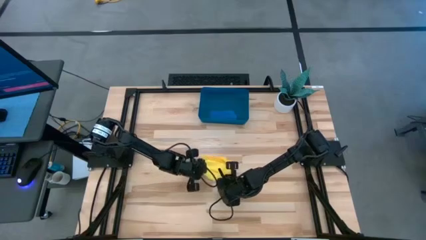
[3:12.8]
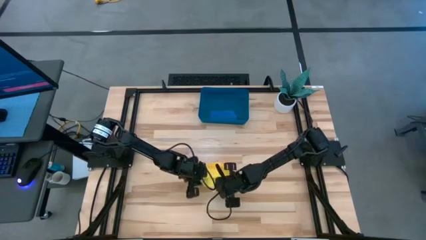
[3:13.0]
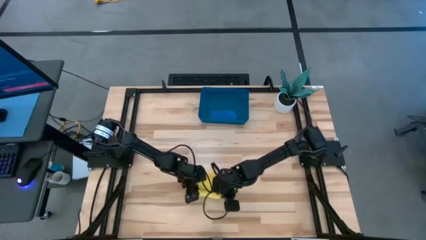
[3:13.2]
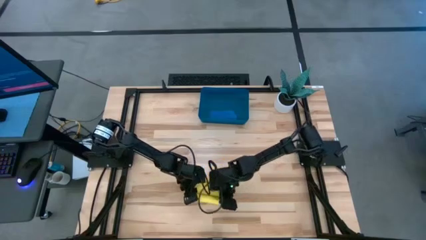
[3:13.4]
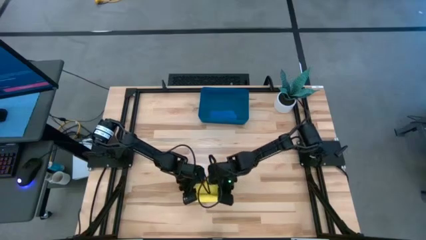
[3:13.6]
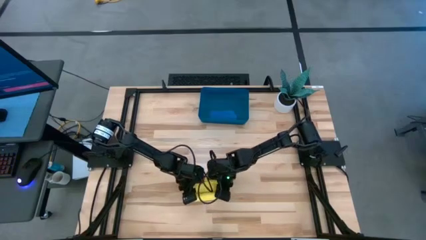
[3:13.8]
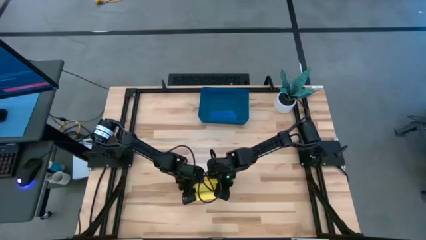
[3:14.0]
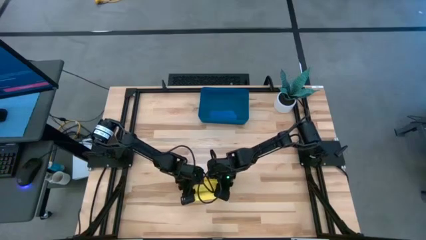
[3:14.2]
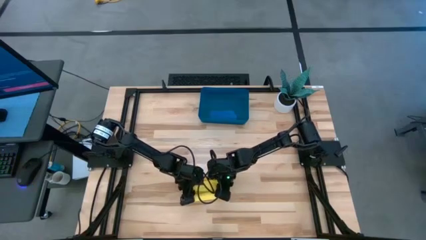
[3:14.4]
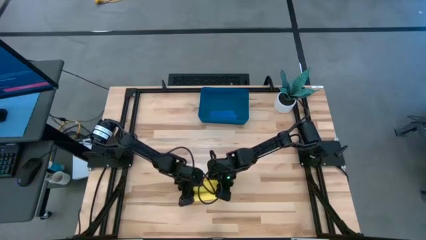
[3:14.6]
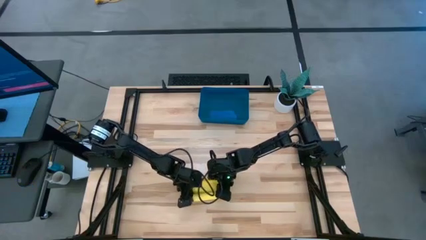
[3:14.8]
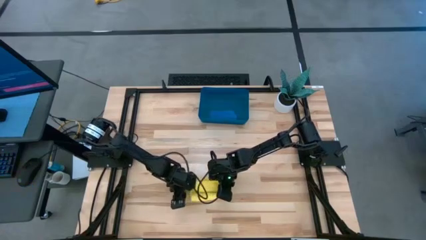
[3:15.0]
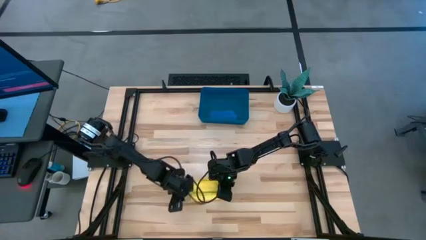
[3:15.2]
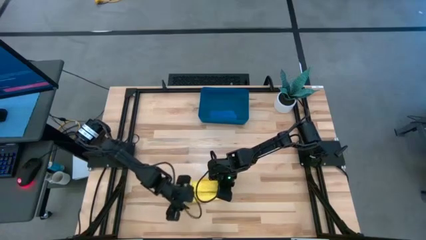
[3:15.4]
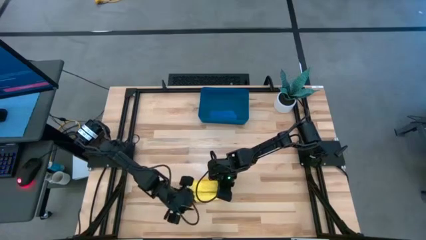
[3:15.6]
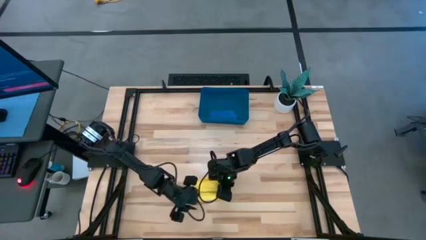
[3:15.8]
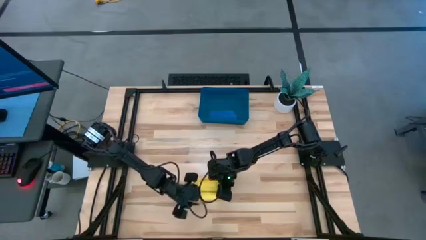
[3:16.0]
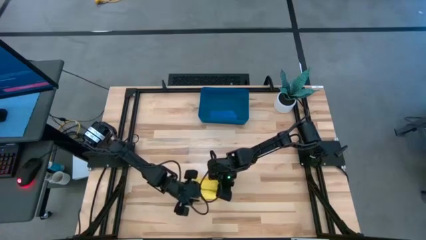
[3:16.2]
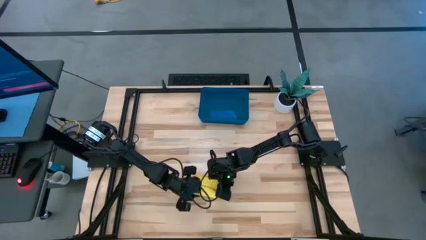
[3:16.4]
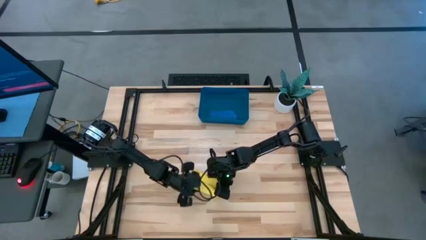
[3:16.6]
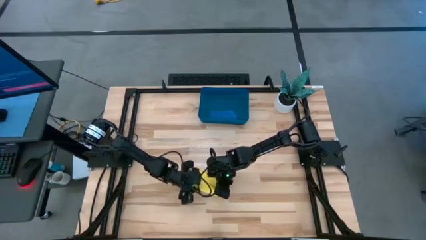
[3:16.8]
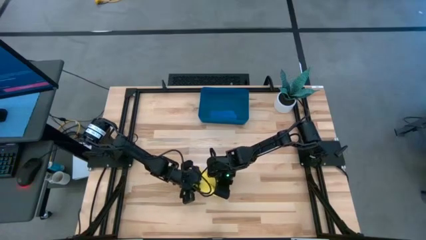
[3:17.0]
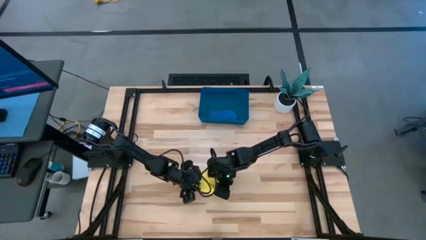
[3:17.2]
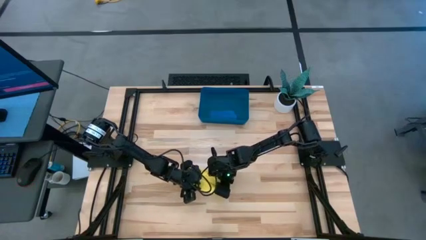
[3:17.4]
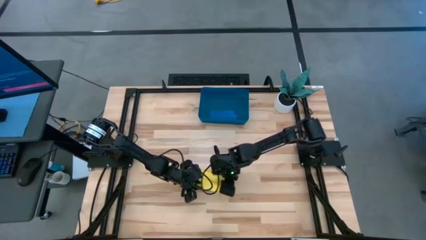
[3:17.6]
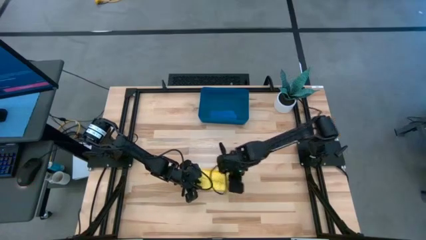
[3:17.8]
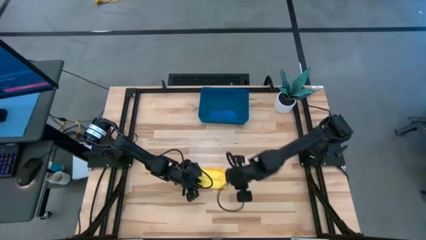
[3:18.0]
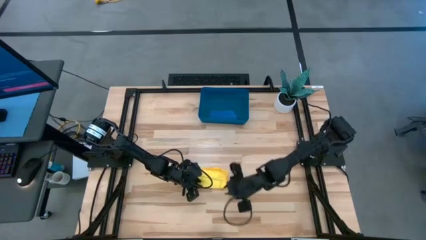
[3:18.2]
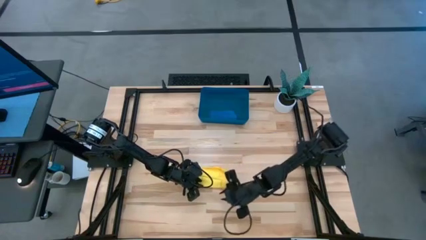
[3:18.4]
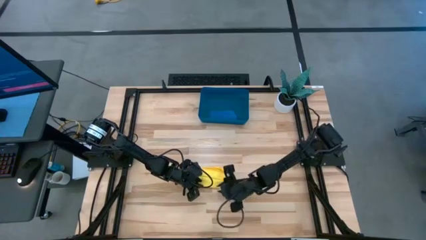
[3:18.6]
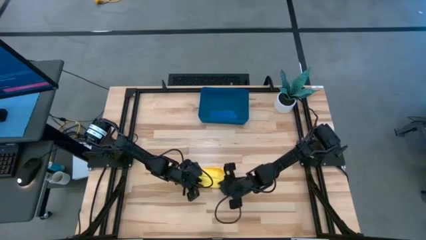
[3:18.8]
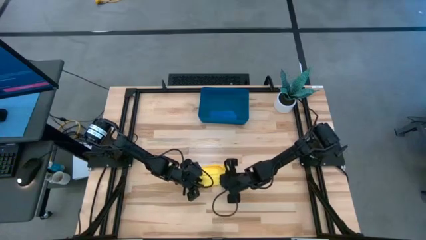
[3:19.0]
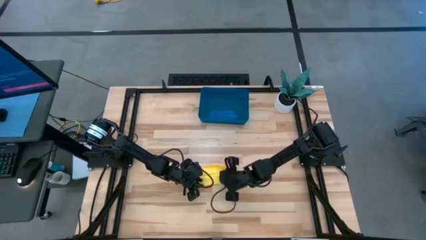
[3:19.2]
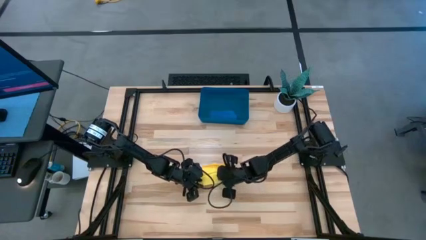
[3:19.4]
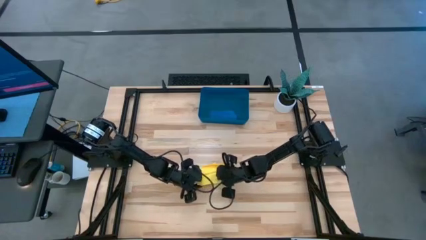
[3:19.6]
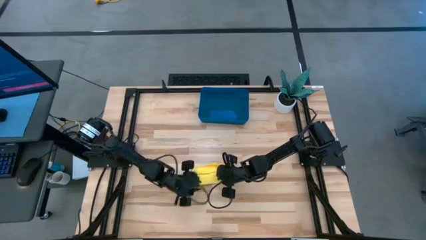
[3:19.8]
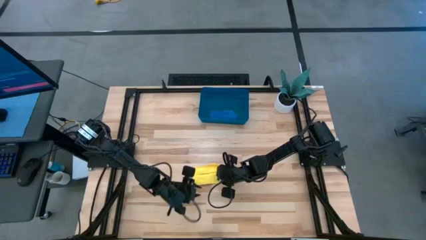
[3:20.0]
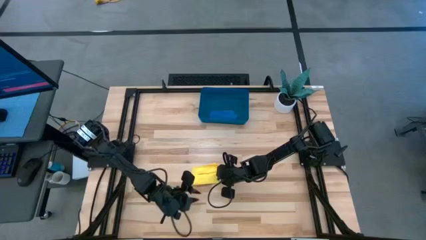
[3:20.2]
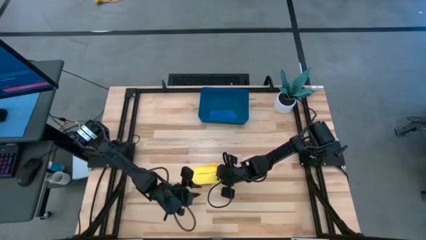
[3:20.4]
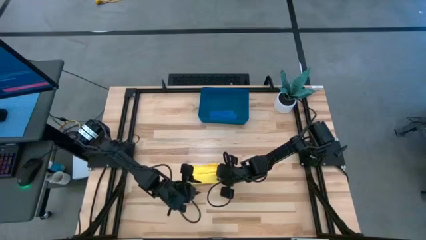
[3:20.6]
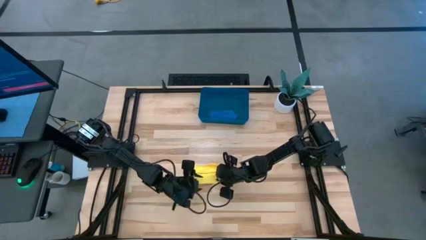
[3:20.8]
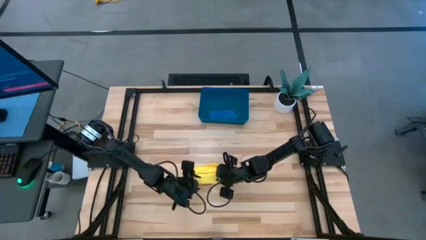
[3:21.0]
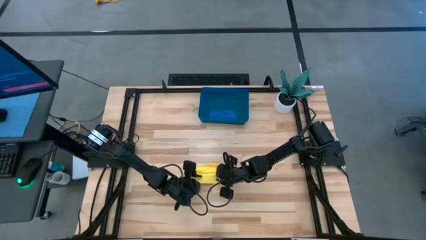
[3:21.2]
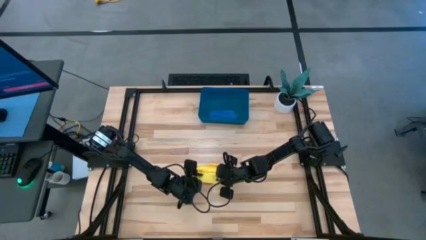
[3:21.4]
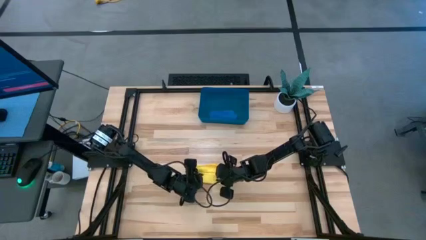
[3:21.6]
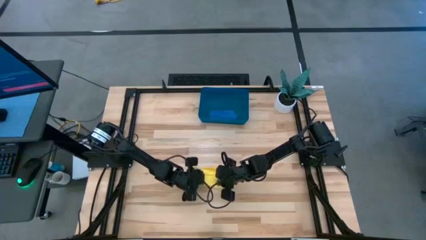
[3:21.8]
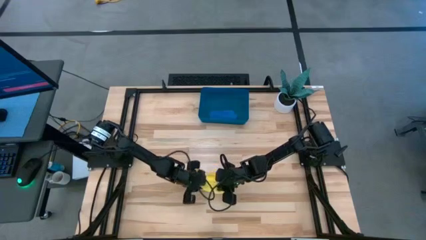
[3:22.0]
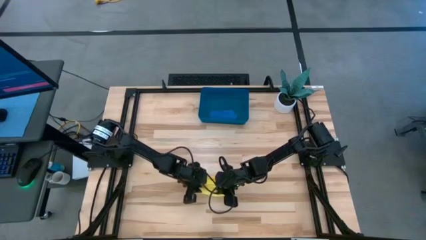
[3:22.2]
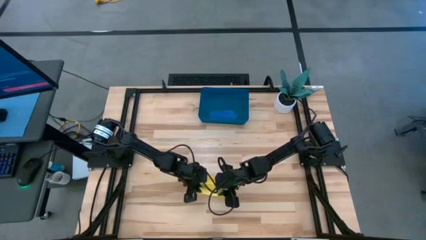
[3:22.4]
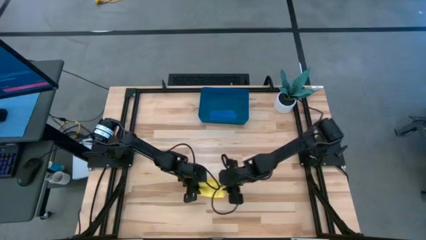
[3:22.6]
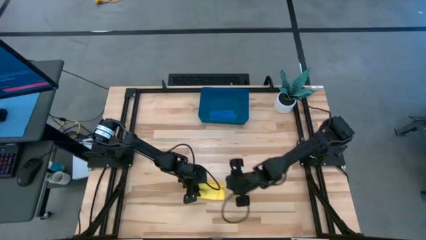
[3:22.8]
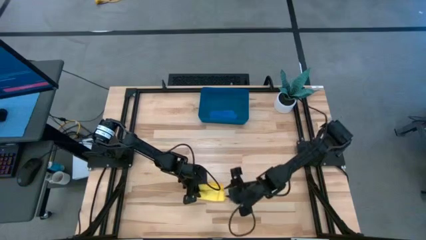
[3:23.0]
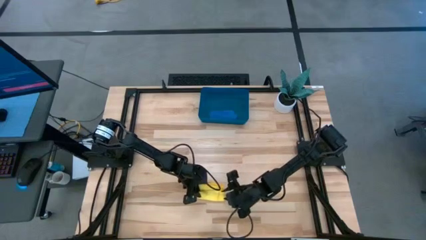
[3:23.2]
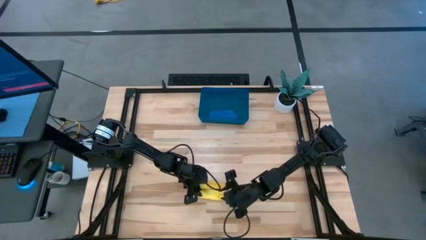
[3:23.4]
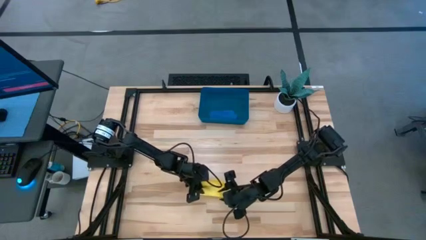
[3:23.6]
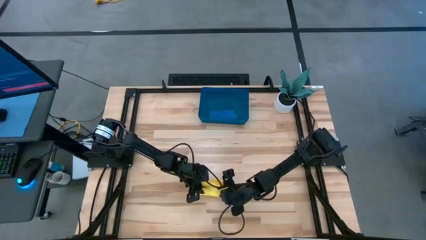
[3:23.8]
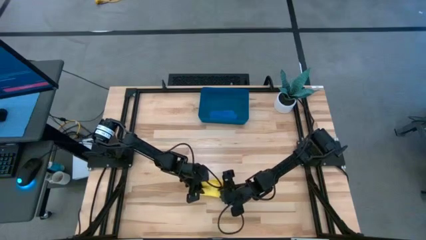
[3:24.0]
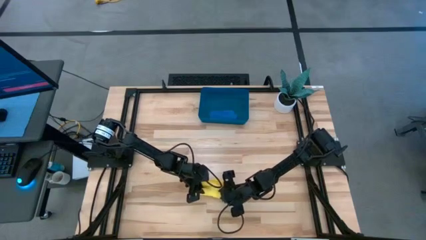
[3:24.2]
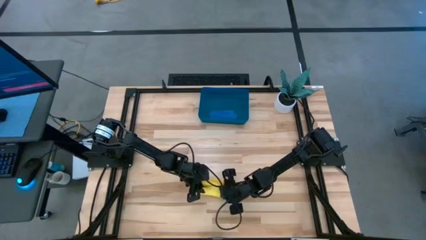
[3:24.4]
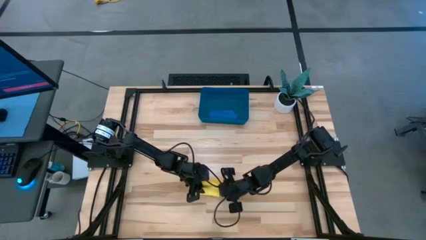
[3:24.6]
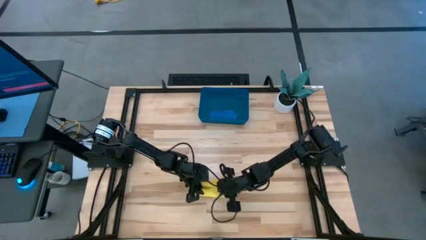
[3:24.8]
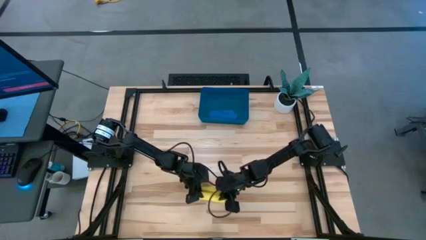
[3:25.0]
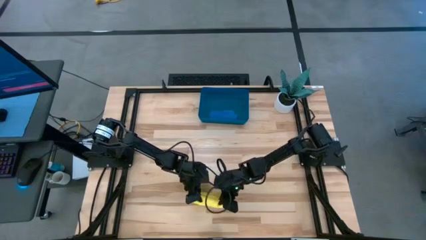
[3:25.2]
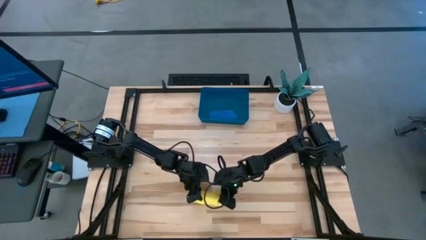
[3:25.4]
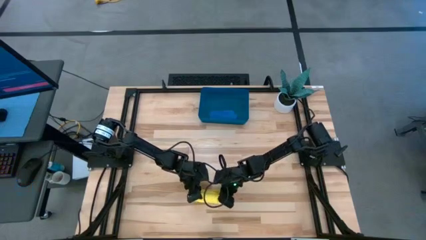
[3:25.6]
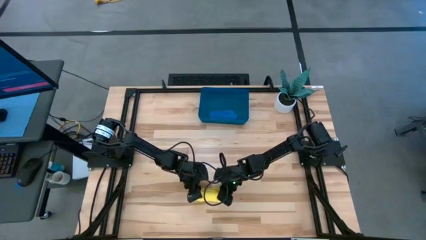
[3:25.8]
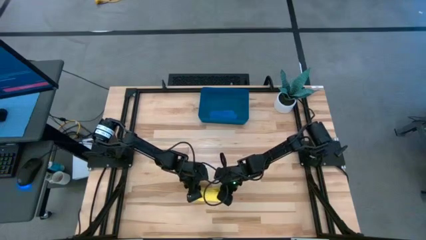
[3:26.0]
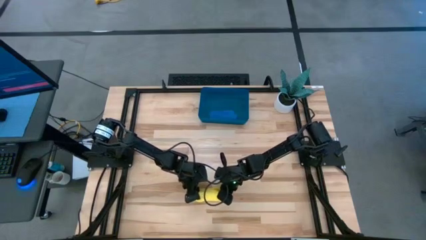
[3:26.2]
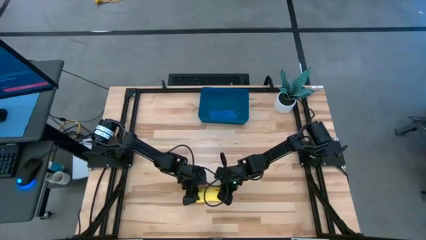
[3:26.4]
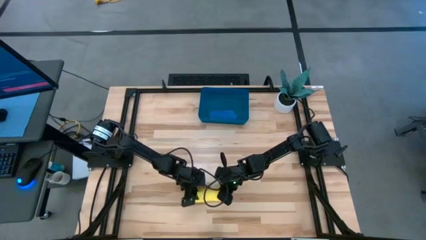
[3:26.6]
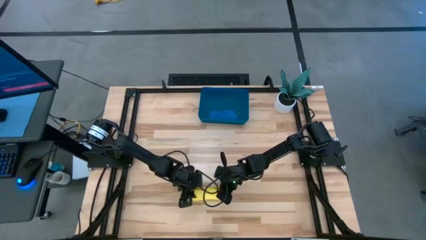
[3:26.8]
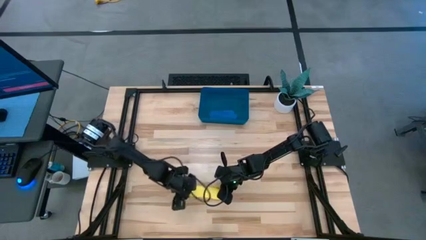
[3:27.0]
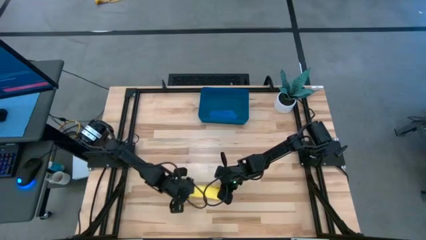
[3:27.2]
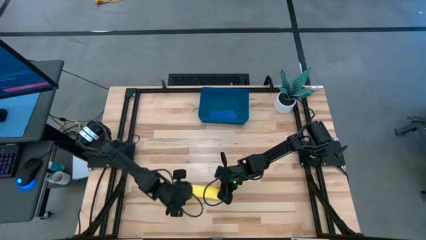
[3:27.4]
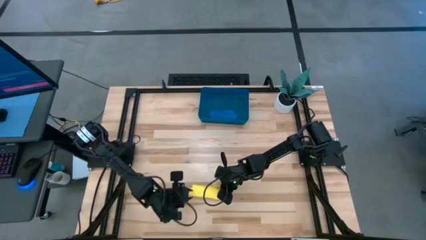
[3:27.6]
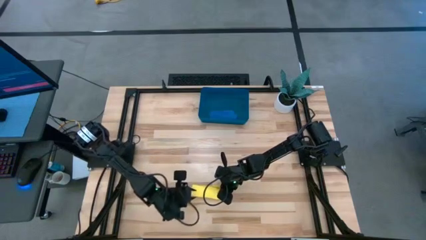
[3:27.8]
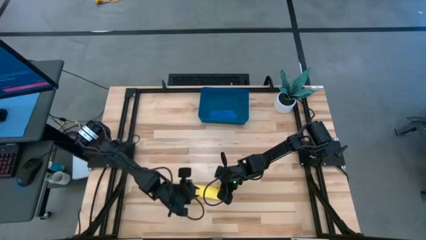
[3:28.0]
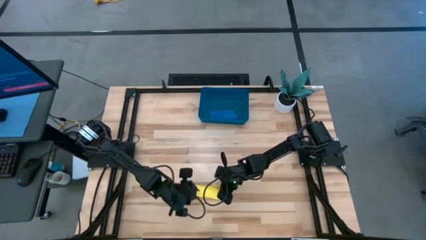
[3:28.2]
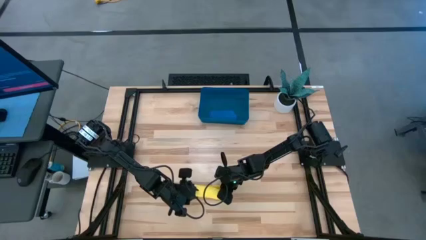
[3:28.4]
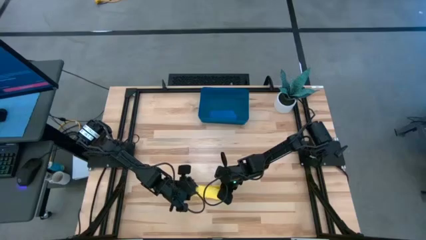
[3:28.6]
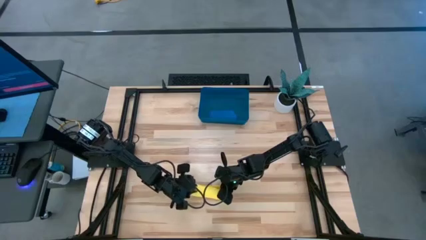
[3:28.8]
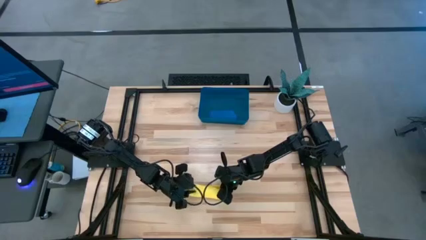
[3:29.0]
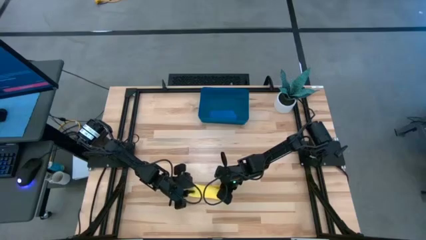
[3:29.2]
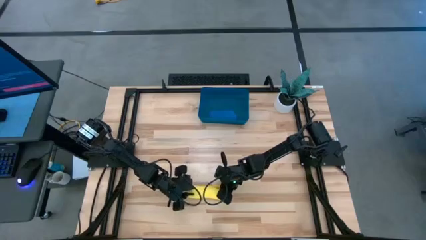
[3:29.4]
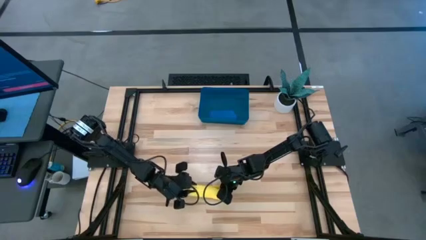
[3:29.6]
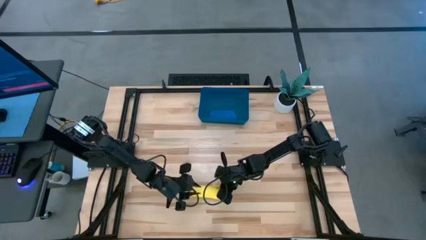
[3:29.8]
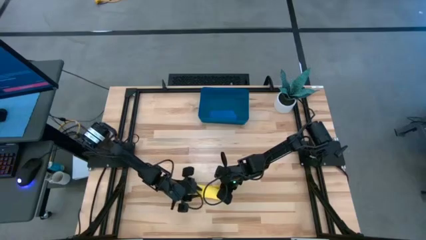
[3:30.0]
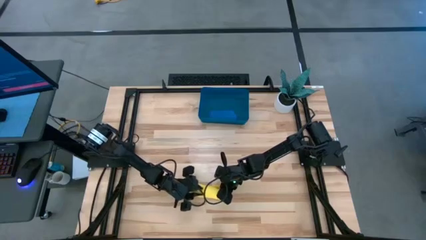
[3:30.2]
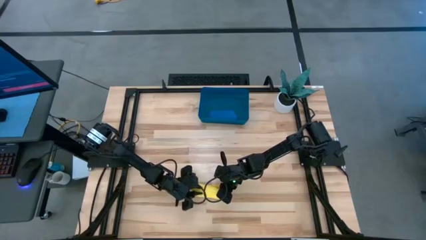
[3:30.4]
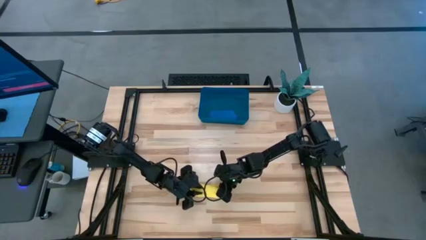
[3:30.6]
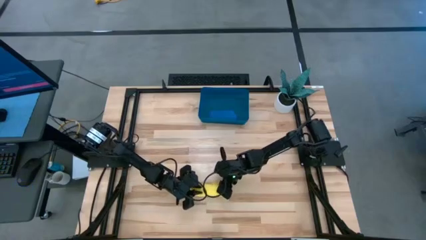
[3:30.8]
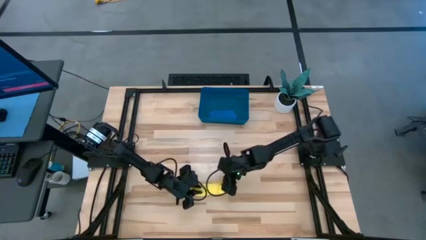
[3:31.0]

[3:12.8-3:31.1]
Task: Roll microfiber towels into tight, uniform cylinder then place into a basket
Roll the yellow microfiber cloth
